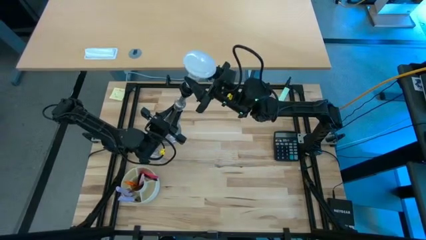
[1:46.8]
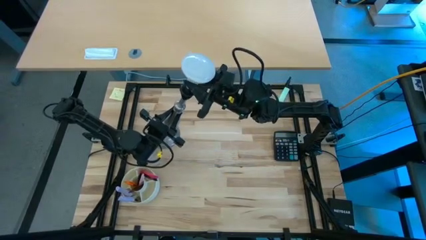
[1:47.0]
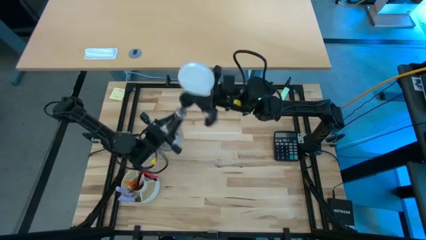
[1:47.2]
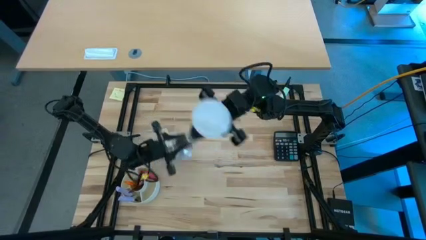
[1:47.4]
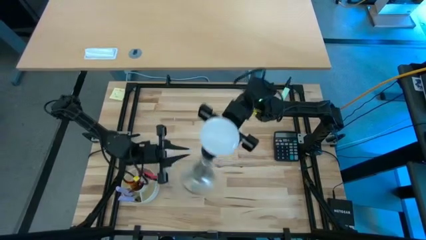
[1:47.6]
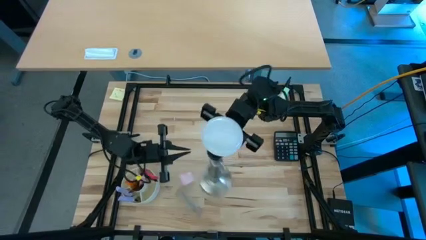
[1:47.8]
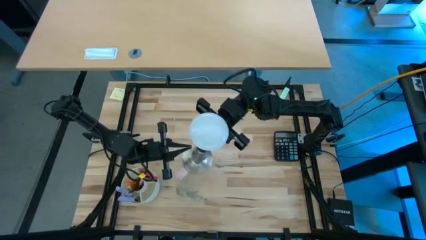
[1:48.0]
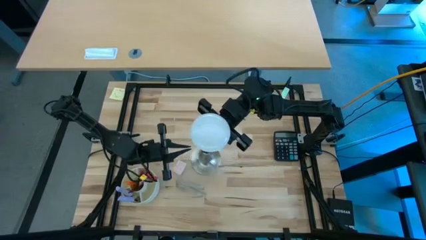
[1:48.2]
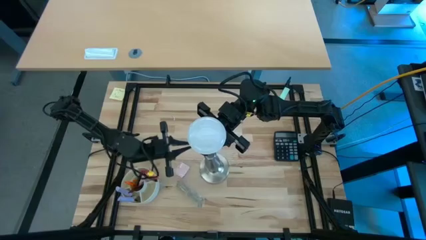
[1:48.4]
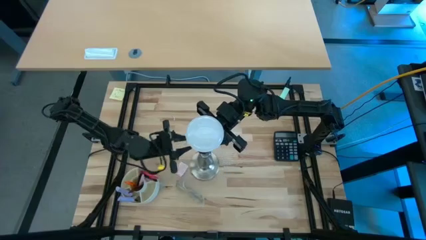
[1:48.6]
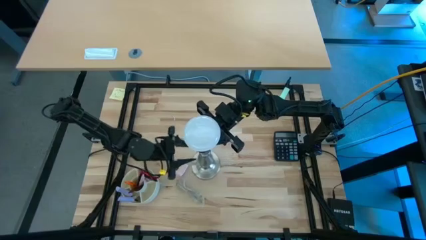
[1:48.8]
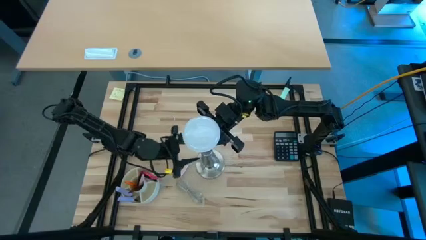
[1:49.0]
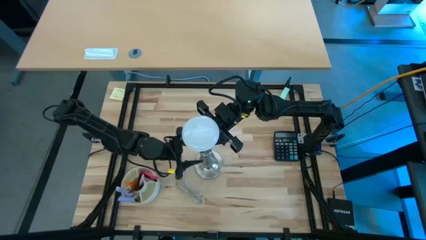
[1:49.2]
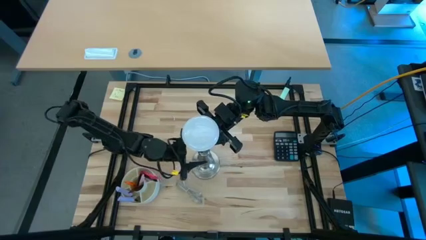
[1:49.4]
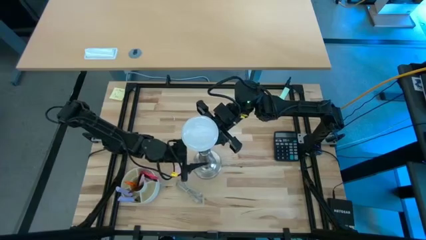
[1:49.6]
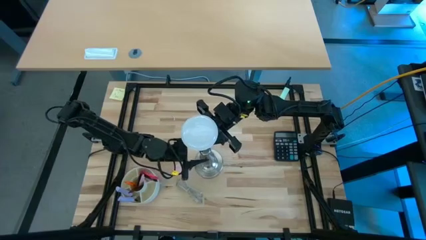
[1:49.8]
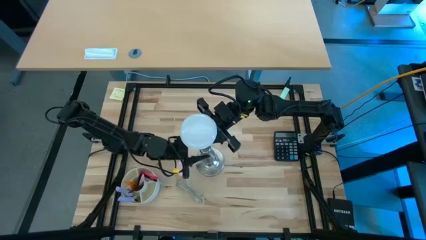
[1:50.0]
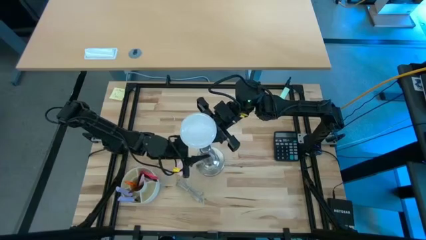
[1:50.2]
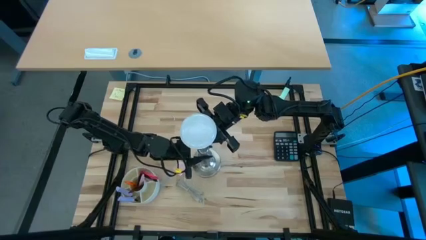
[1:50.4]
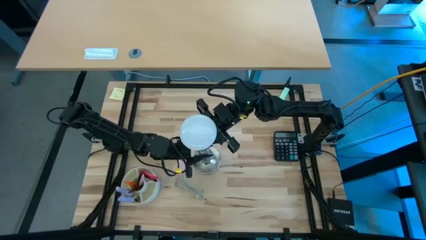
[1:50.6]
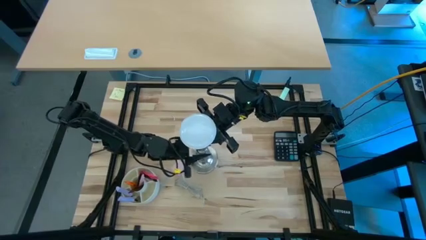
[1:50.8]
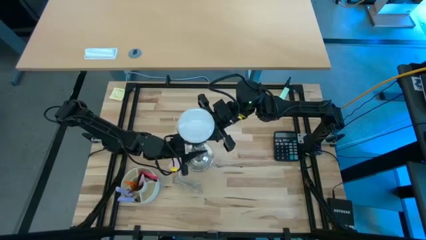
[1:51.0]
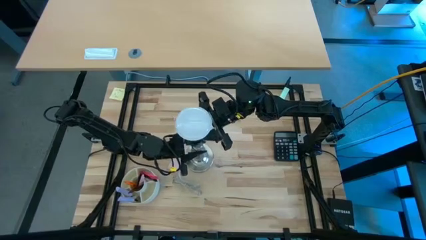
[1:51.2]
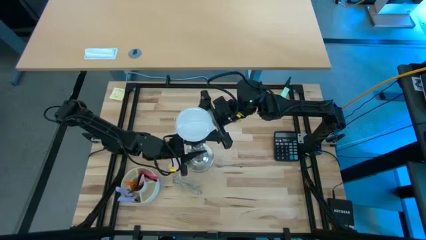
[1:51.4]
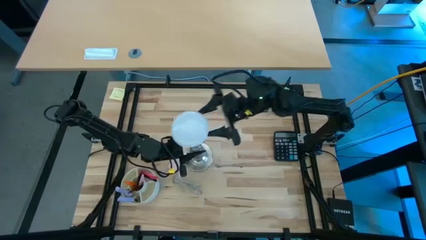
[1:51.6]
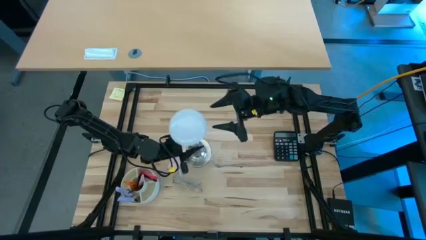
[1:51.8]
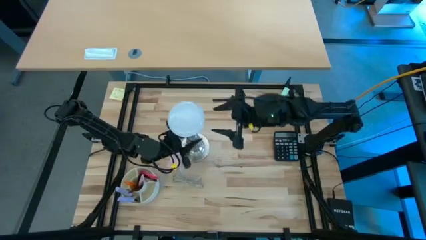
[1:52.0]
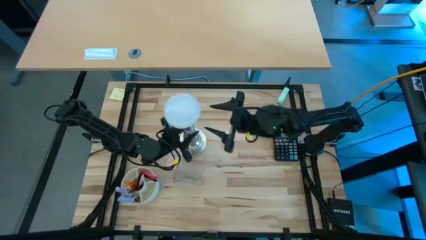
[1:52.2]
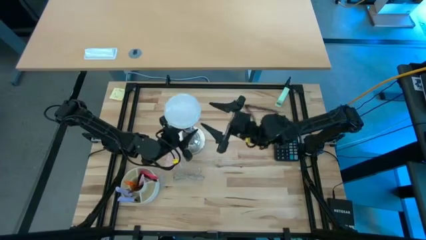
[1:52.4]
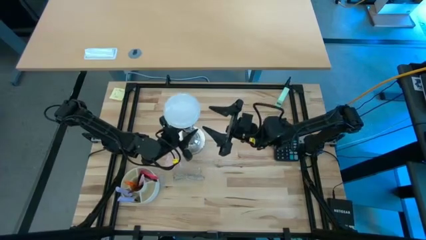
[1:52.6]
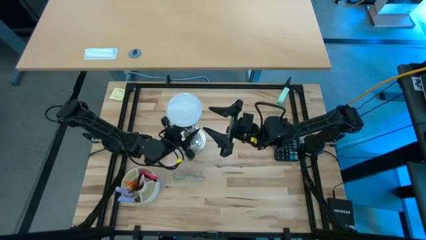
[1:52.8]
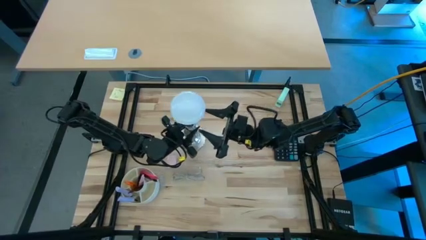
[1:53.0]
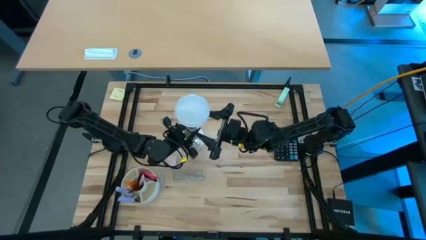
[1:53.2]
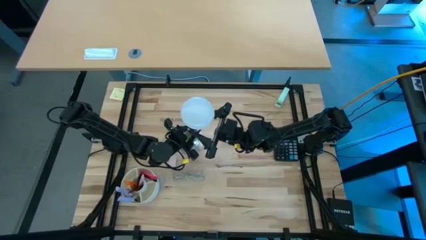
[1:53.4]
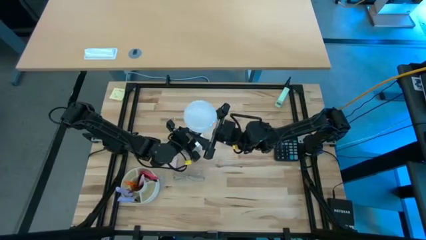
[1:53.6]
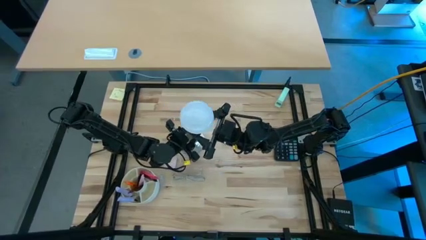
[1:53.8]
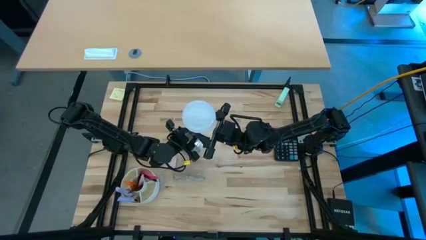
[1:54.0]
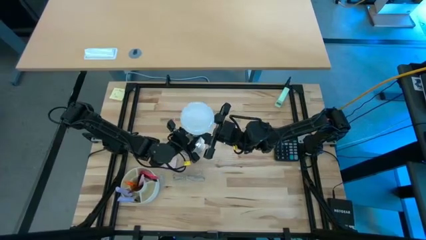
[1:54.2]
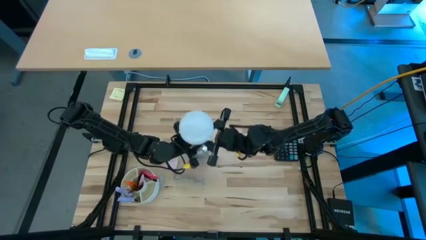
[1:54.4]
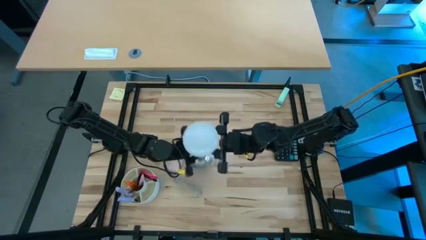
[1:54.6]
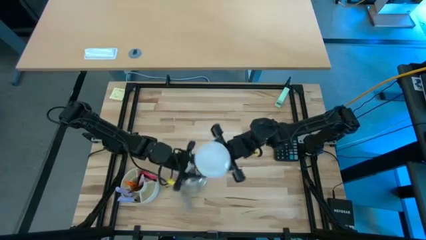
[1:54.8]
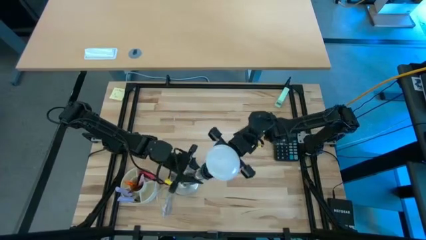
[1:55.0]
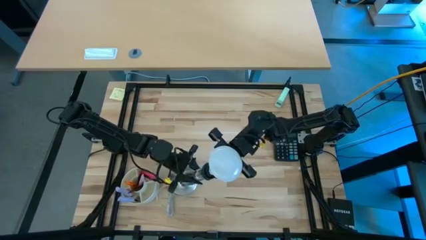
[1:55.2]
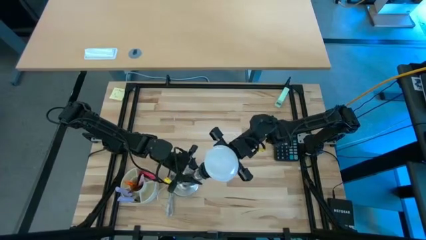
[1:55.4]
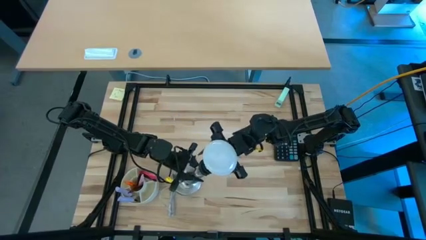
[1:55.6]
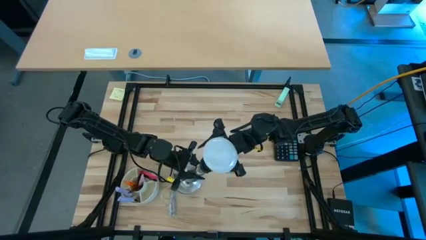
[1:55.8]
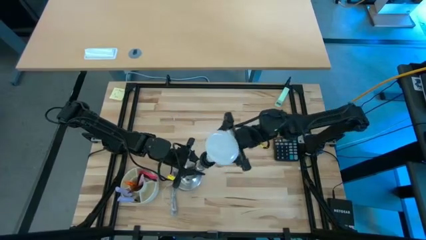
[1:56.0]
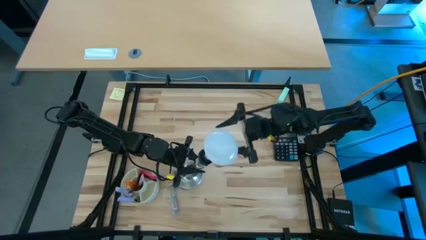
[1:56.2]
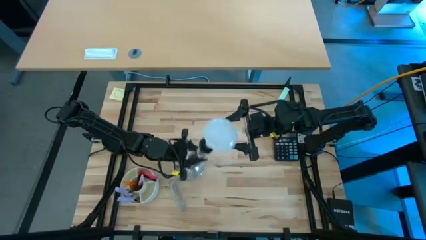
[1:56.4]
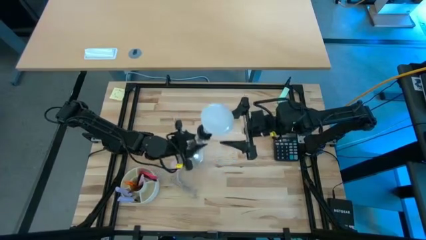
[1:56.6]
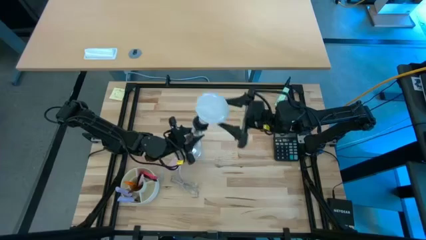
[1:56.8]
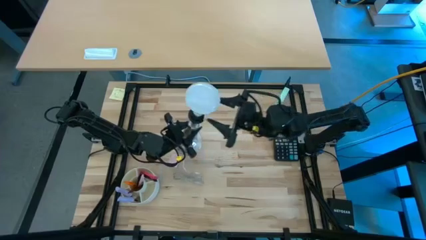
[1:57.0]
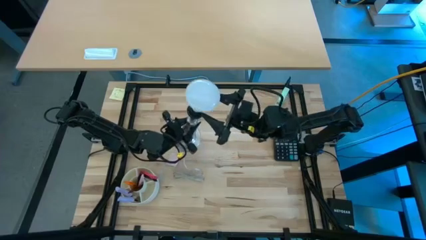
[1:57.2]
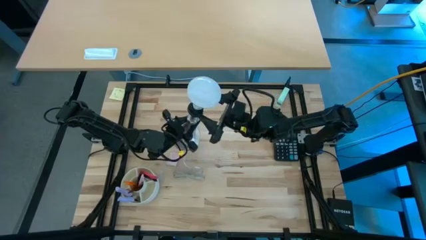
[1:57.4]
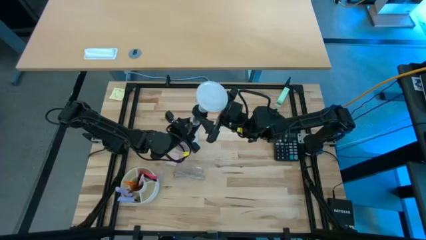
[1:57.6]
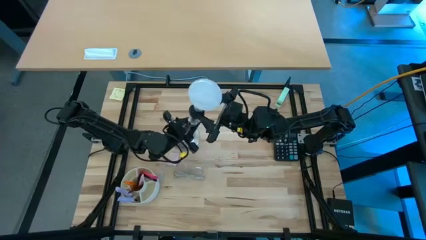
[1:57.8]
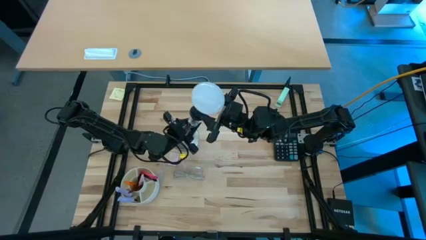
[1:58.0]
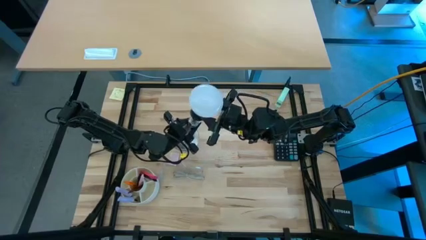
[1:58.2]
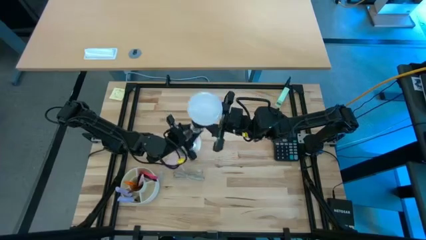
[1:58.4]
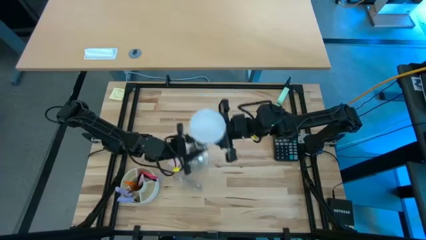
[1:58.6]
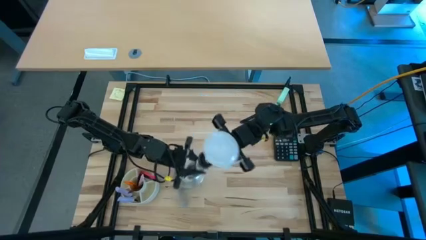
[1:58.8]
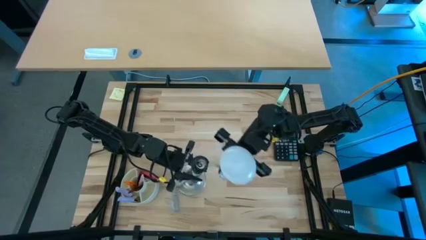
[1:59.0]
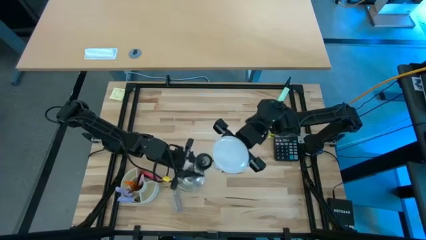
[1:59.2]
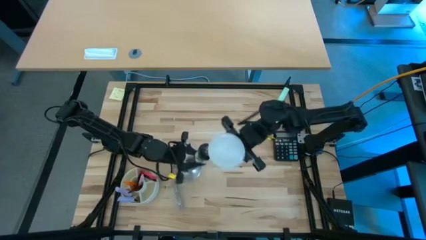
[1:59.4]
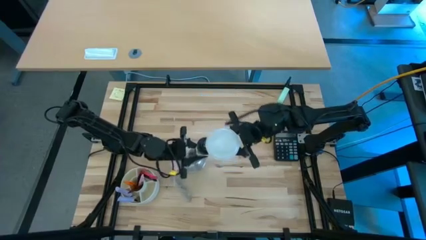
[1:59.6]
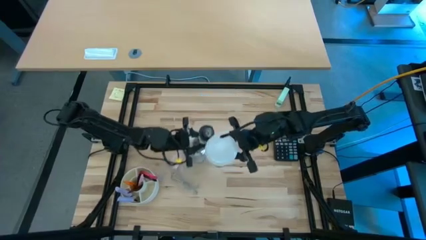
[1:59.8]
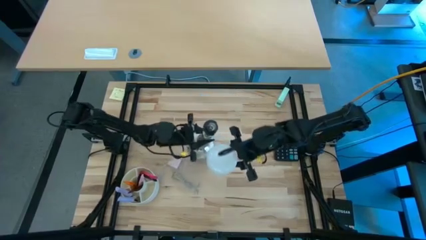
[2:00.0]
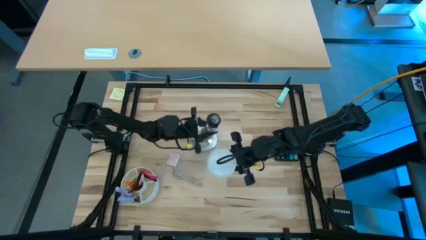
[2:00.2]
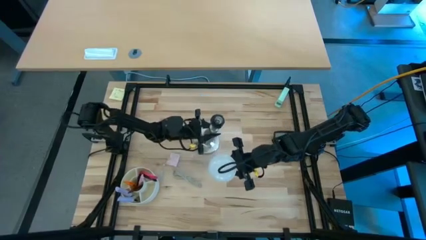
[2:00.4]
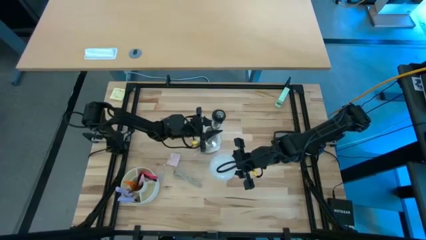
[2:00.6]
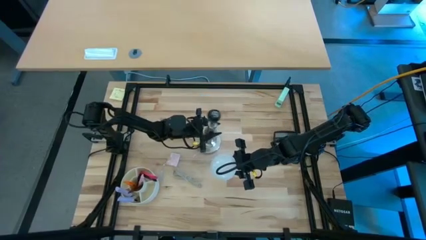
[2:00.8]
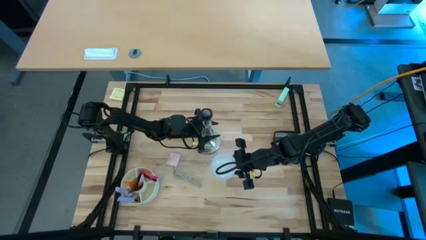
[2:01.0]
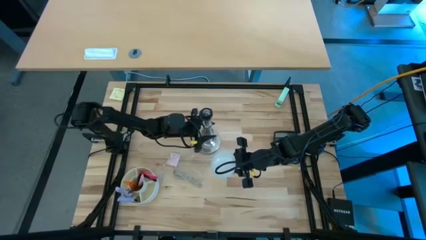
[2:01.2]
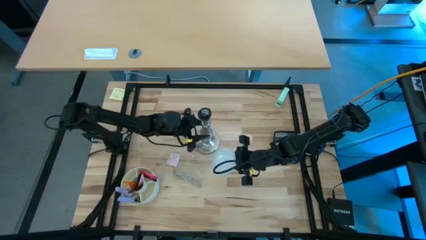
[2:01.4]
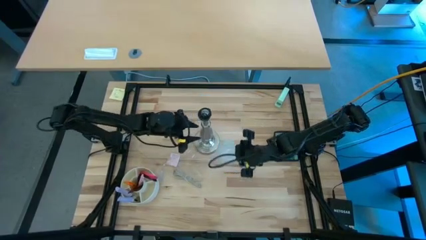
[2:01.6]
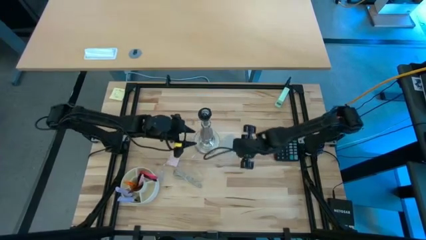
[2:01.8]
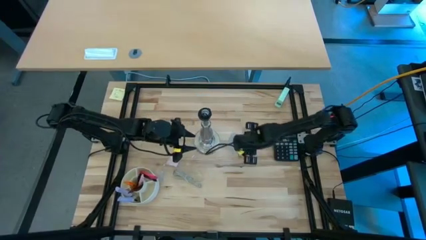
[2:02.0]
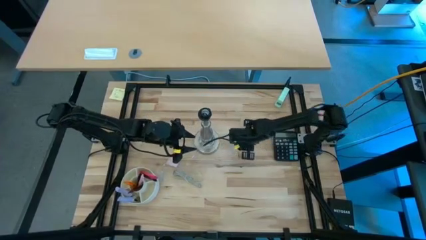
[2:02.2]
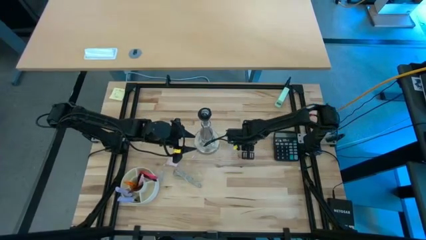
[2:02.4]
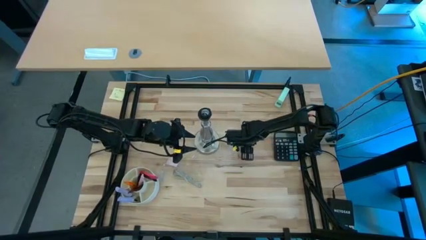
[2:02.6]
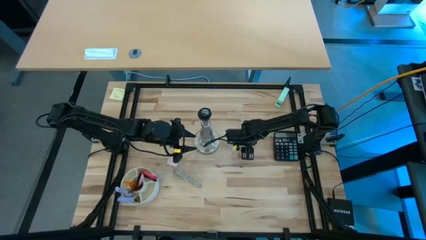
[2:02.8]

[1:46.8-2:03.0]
Task: Screw lightbulb
Remove the white lightbulb from the silver lamp
